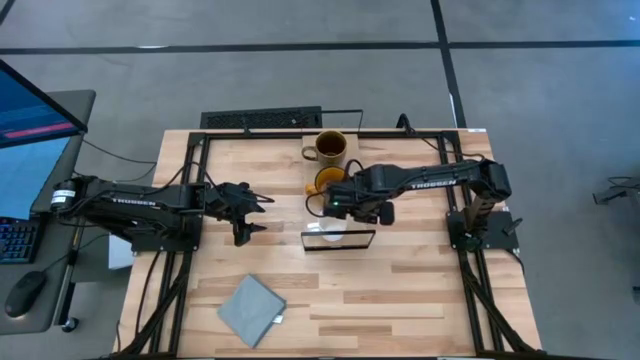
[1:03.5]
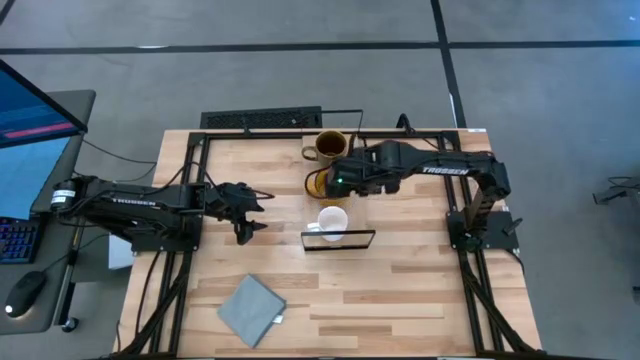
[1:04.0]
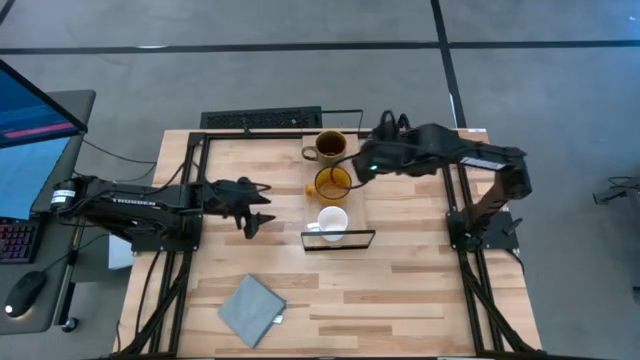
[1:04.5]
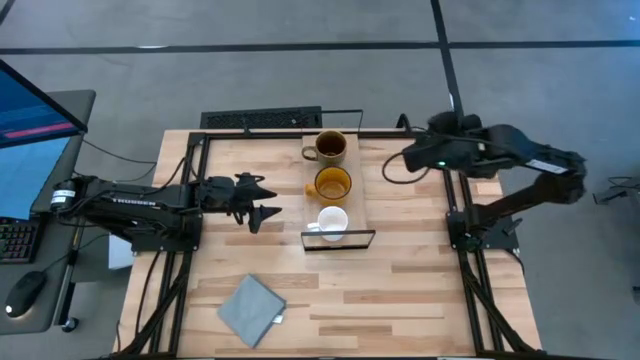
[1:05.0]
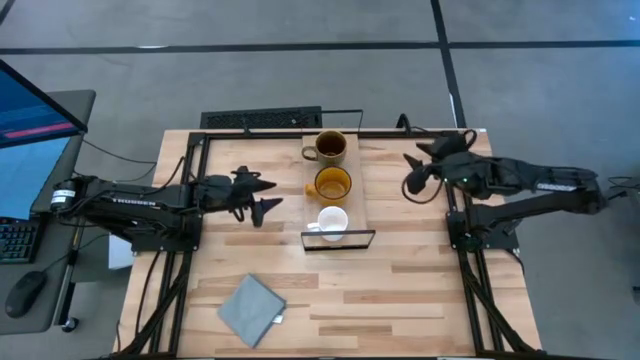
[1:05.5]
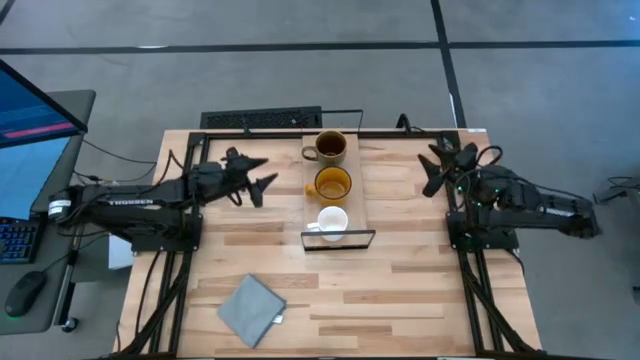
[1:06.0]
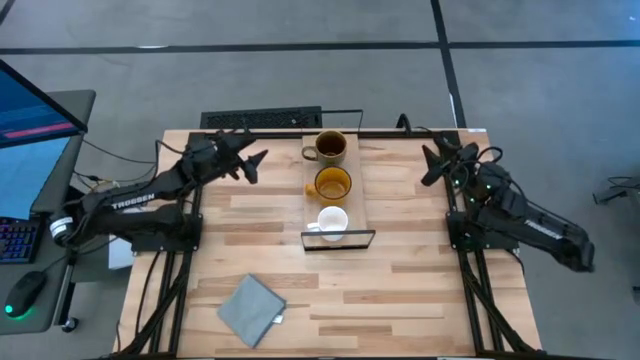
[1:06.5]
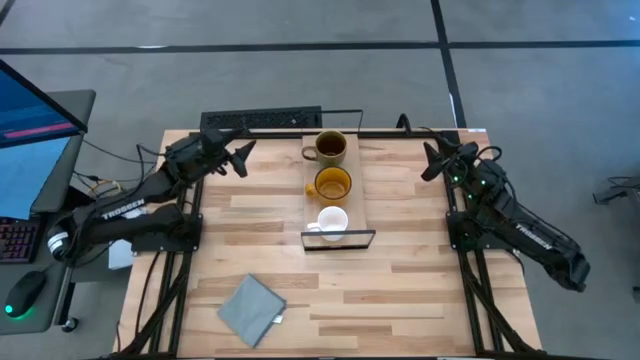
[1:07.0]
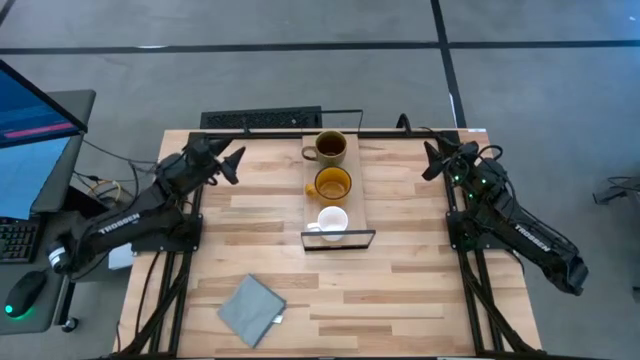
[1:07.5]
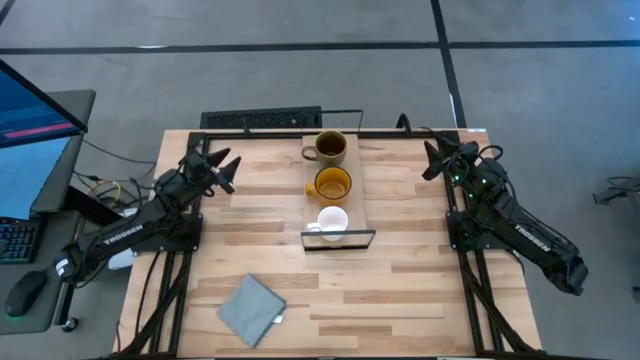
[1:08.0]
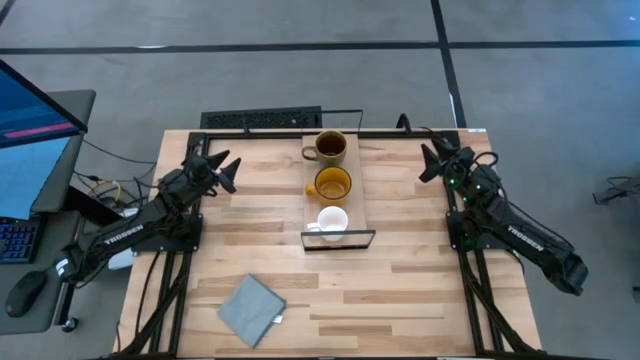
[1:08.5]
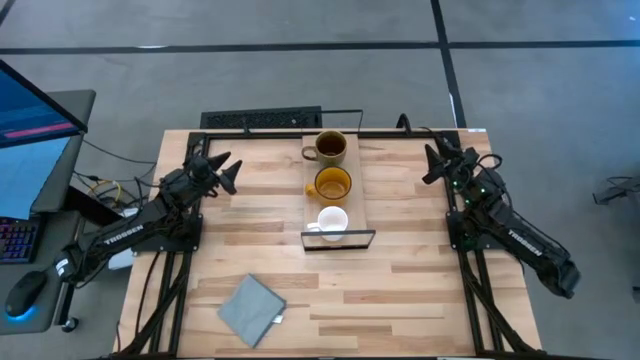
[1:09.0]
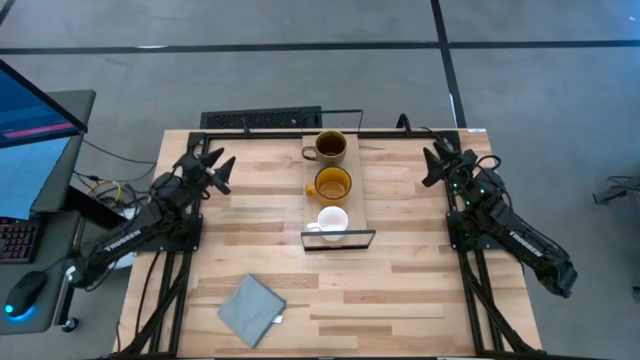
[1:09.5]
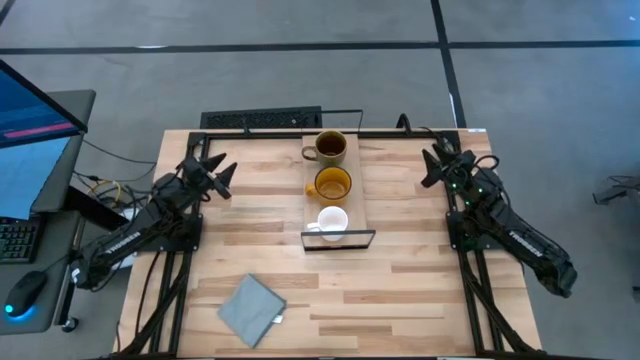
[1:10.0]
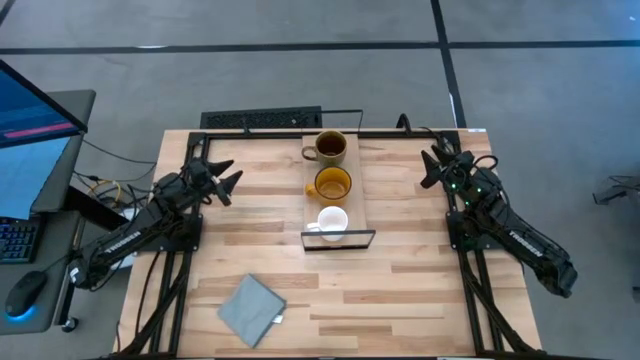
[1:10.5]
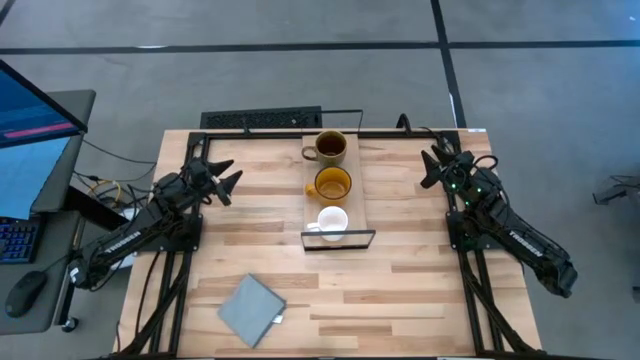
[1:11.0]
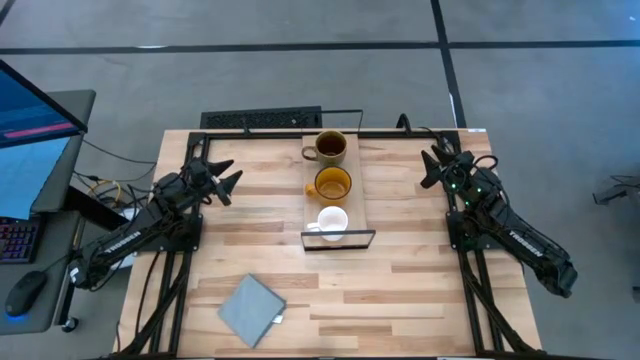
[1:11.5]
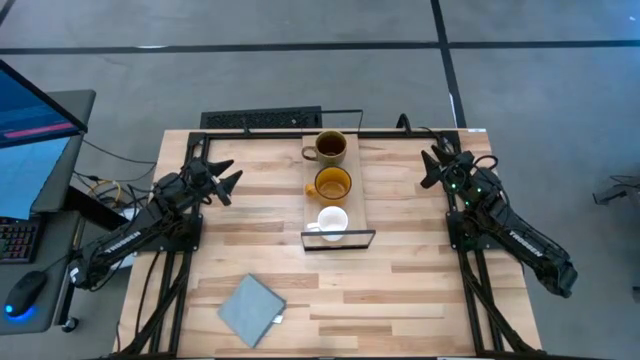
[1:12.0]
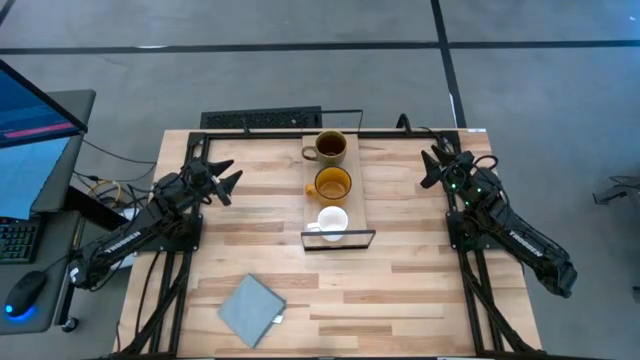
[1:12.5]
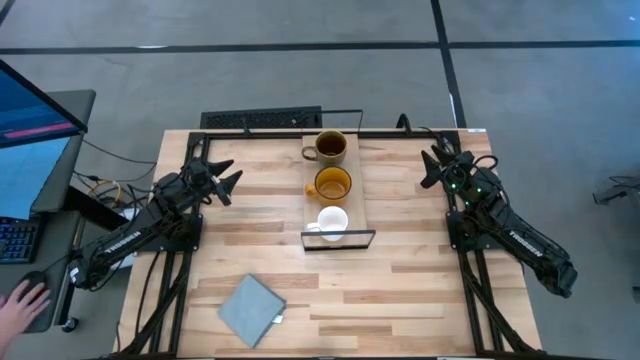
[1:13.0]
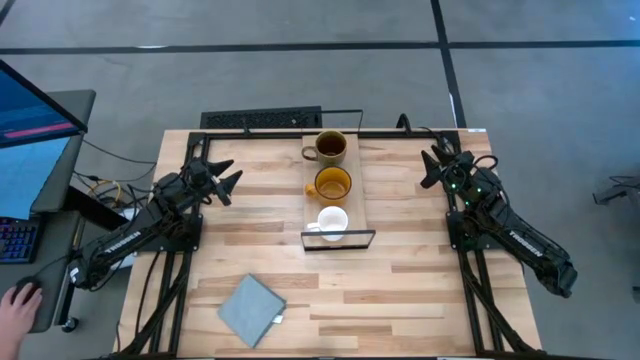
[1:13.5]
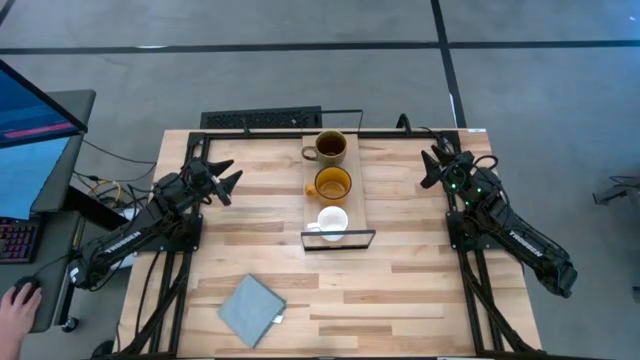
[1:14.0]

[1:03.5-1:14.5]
Task: Stack small to large cups/mugs on shelf
Return to Home Position

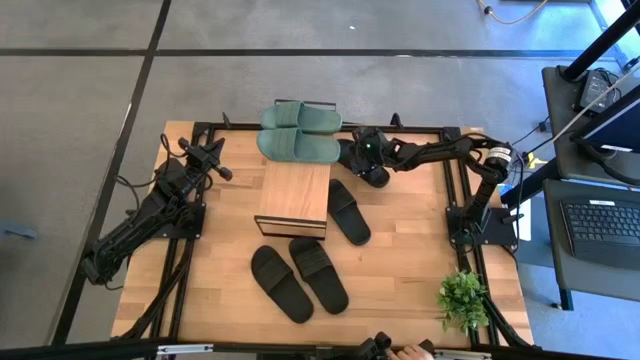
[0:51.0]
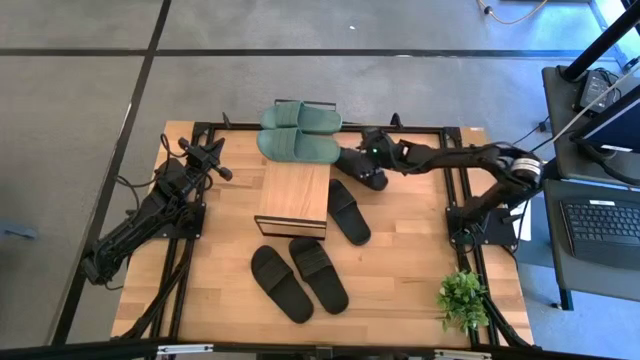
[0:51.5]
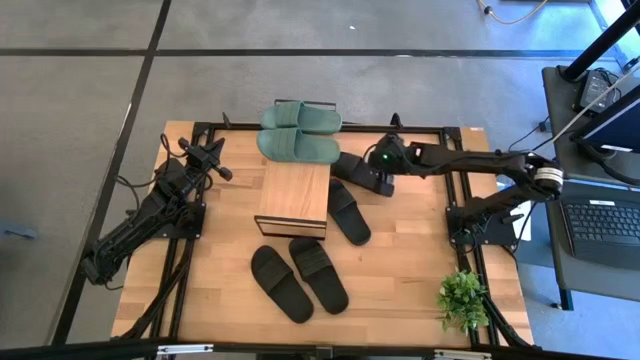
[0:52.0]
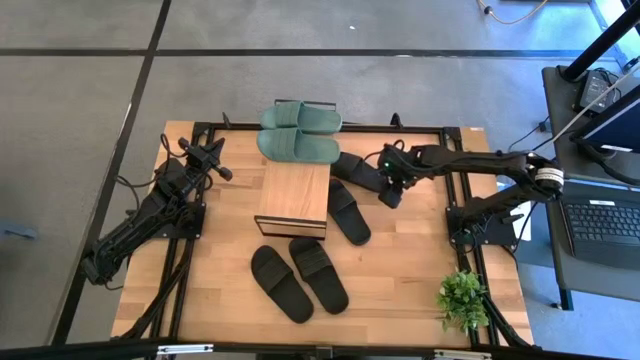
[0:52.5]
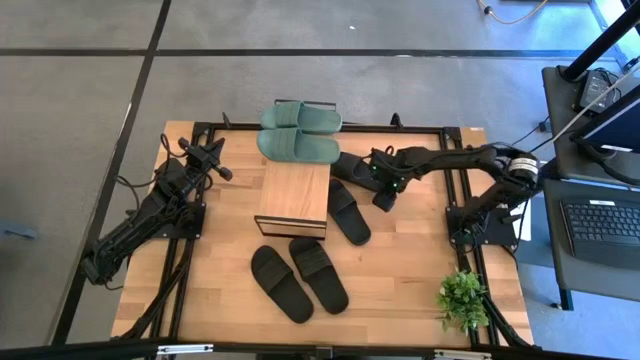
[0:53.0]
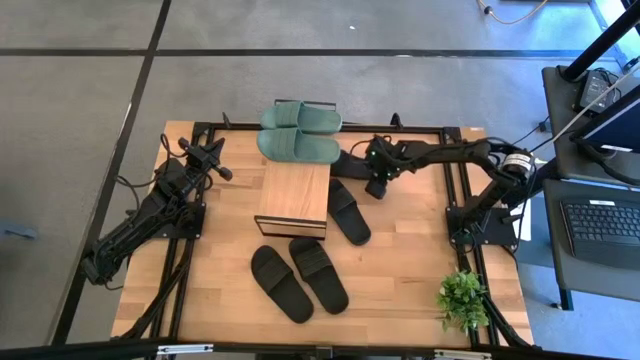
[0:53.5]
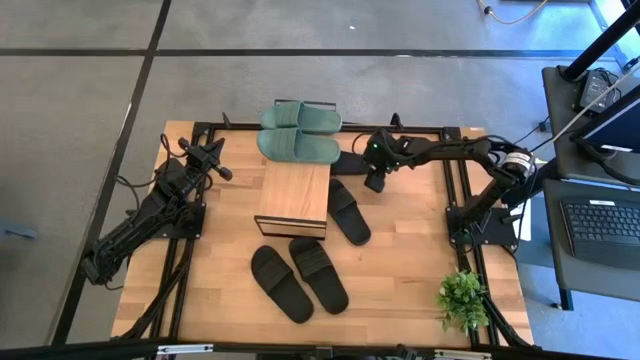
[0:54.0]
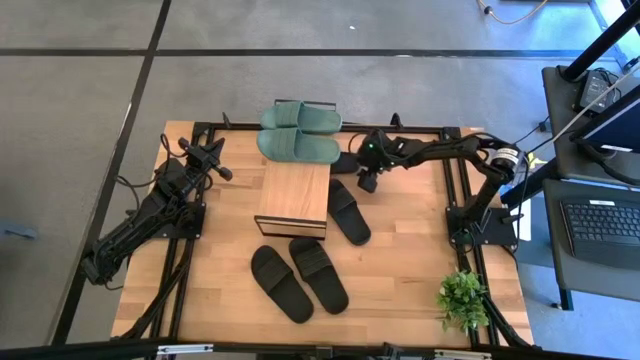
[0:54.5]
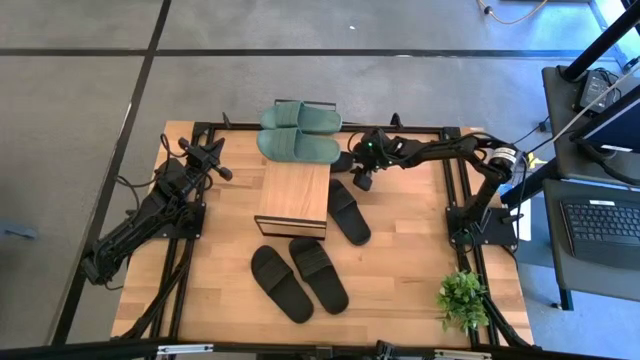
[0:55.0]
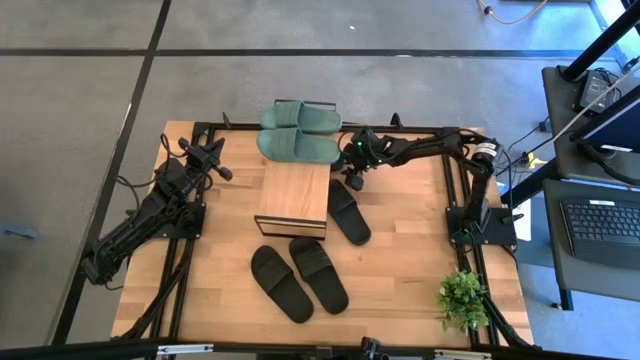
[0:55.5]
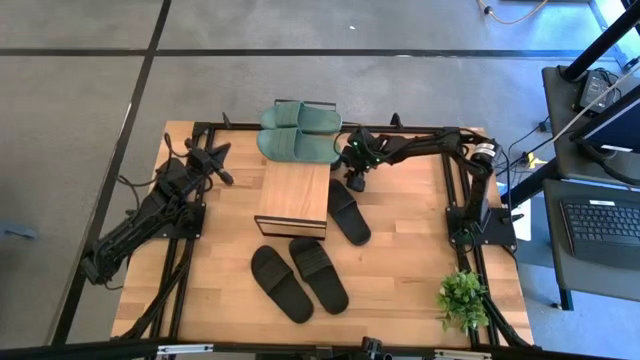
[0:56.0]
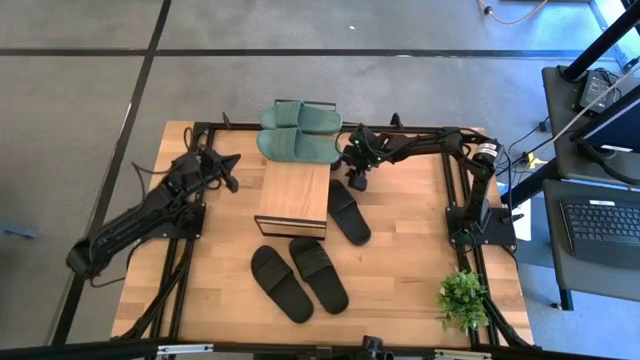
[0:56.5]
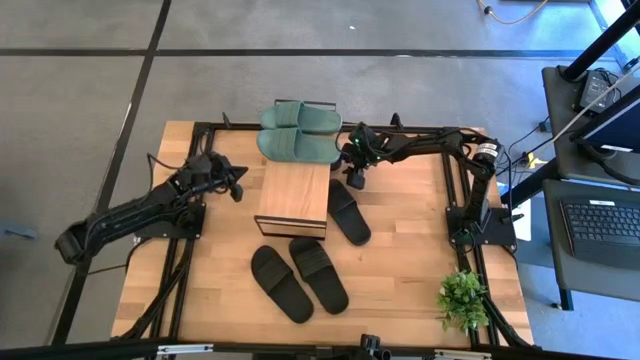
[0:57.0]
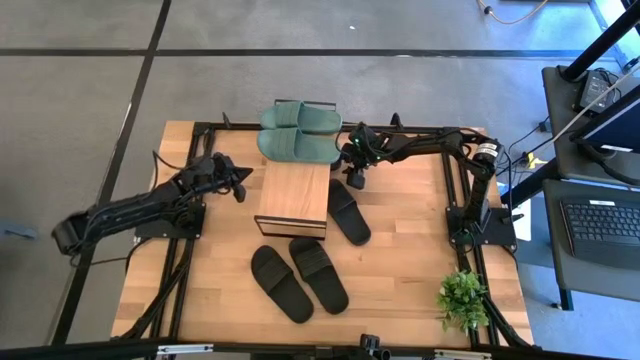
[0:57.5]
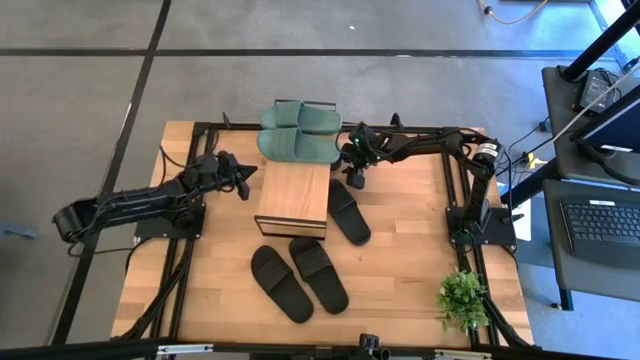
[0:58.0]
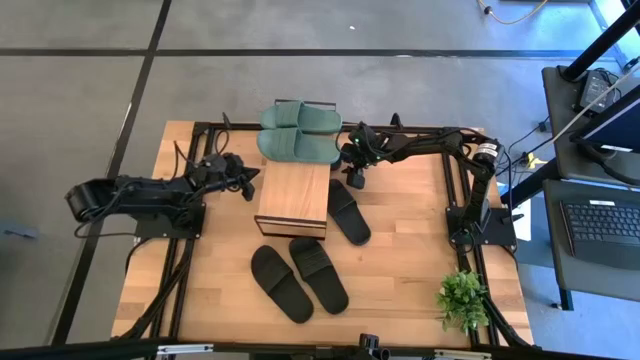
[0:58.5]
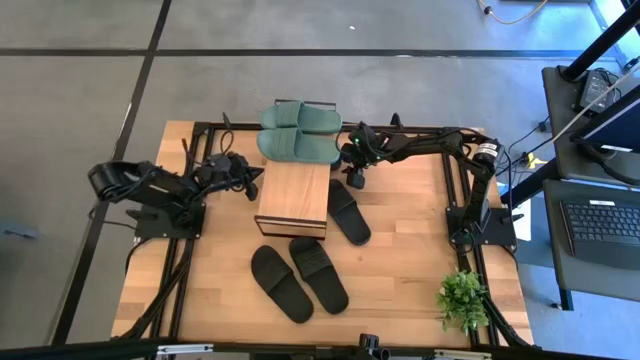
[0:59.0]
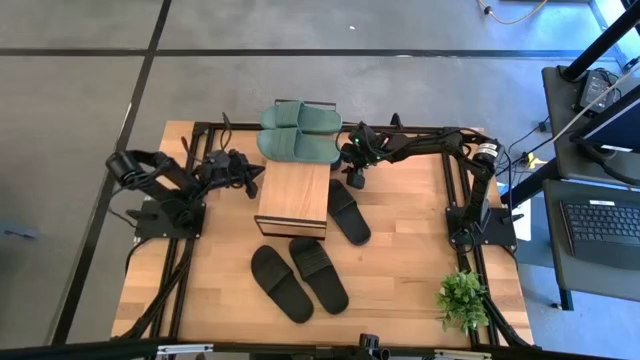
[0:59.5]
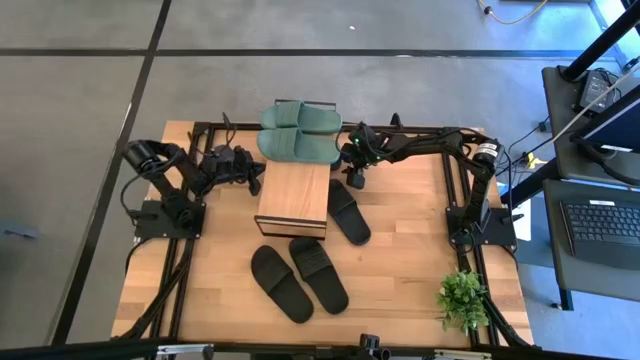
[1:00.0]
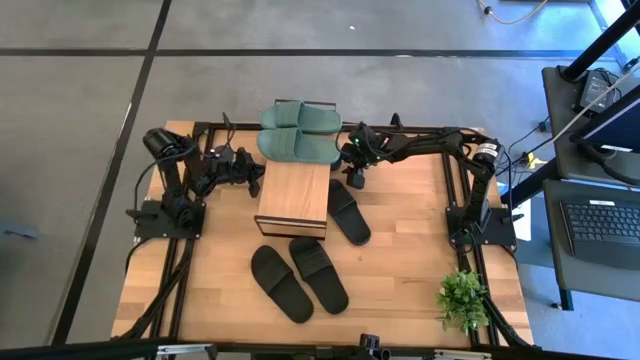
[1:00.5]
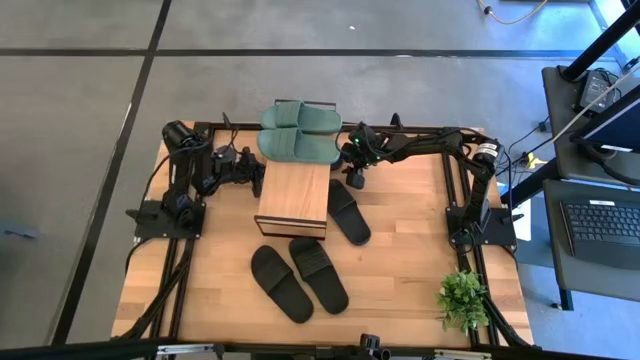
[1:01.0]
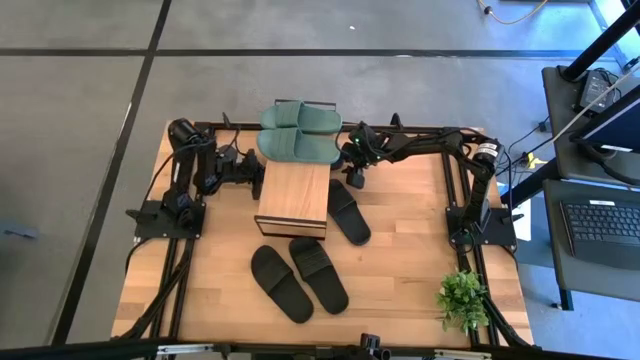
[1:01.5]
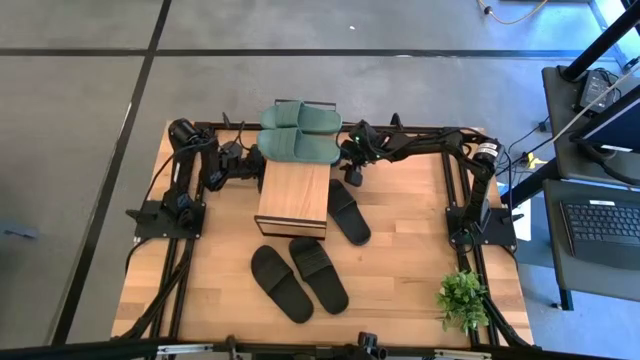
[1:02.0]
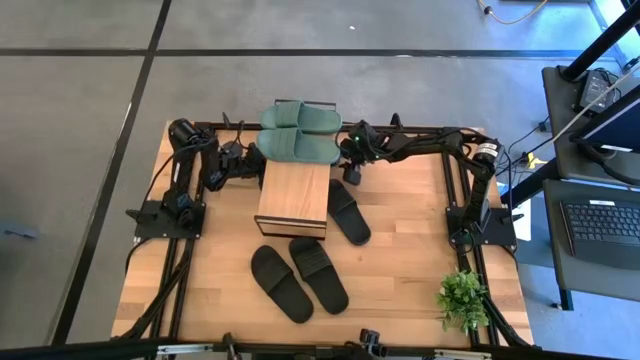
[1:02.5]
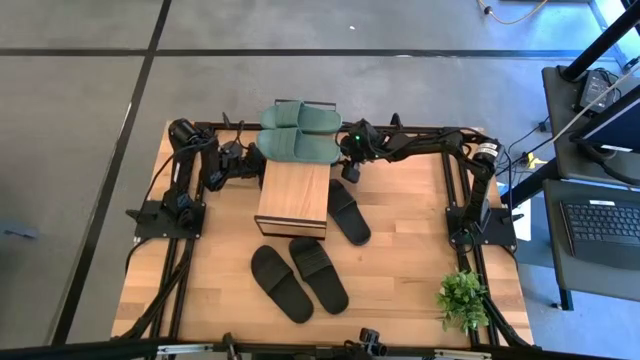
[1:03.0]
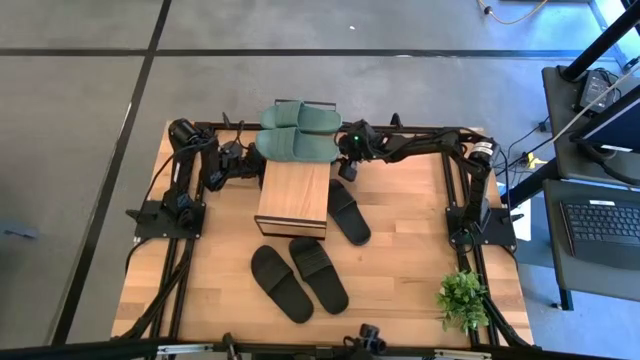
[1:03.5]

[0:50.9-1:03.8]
Task: Pick and place slides into the shelf
Put the black slide under the shelf
